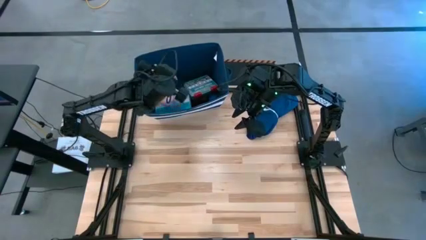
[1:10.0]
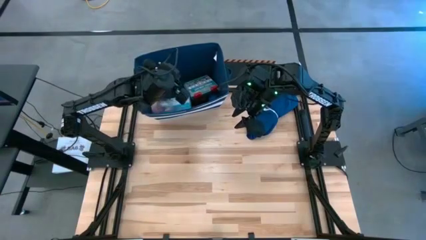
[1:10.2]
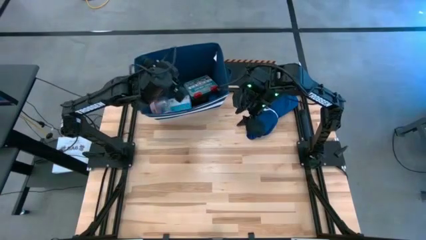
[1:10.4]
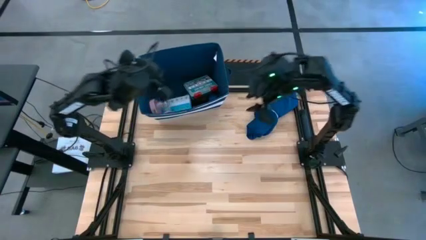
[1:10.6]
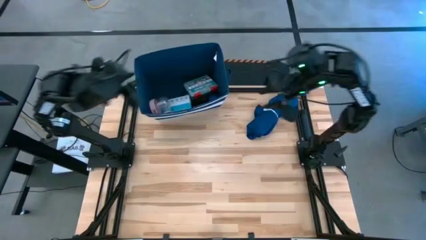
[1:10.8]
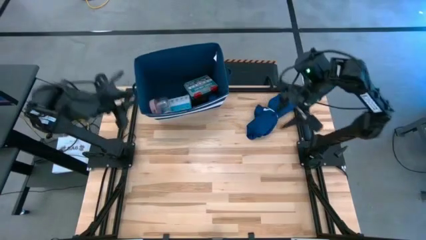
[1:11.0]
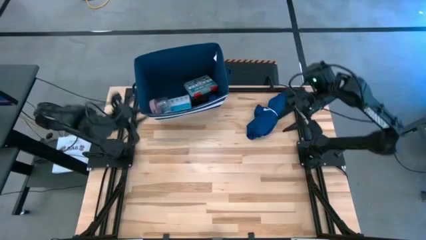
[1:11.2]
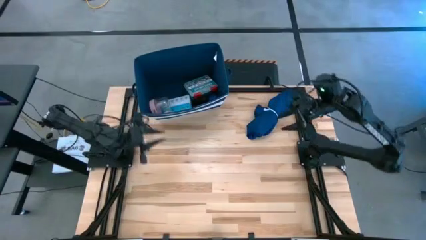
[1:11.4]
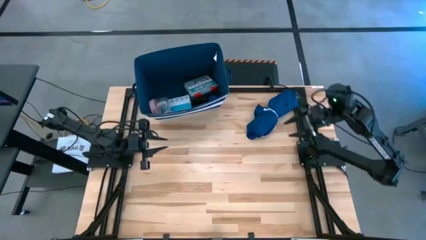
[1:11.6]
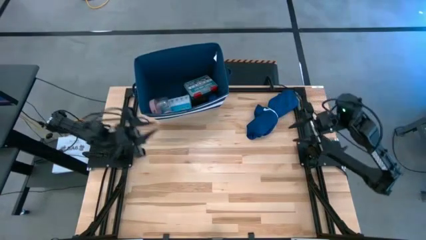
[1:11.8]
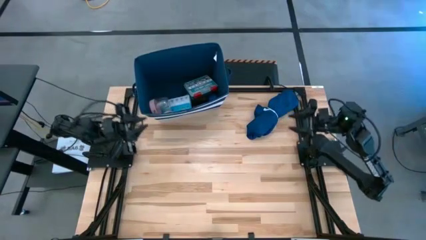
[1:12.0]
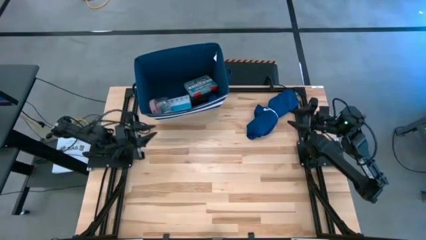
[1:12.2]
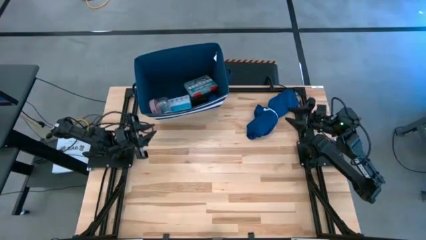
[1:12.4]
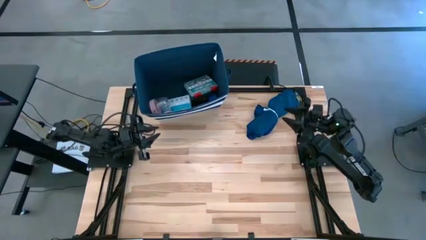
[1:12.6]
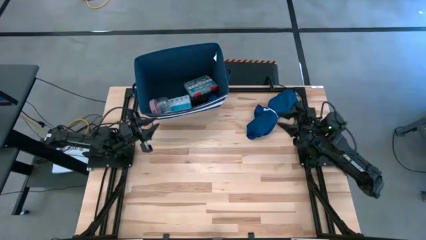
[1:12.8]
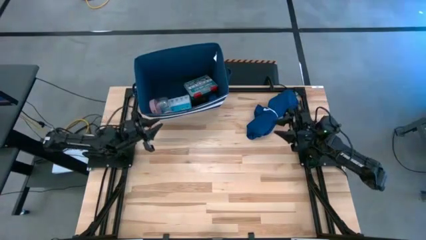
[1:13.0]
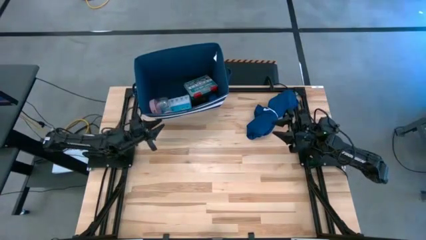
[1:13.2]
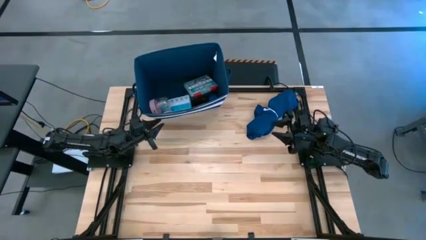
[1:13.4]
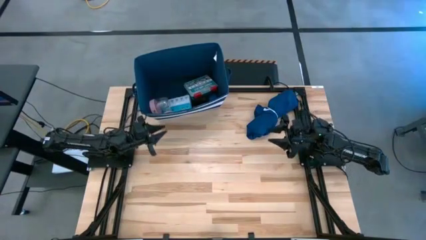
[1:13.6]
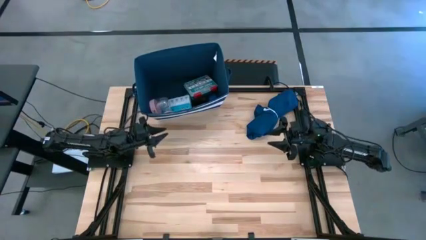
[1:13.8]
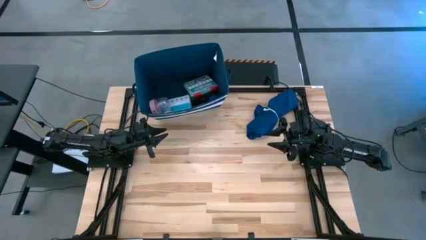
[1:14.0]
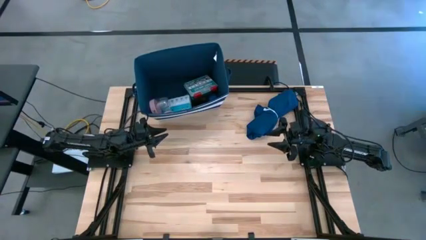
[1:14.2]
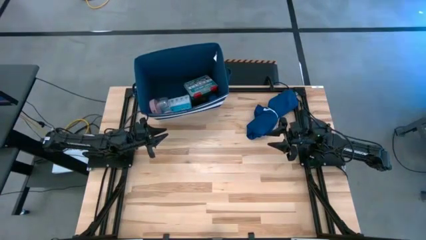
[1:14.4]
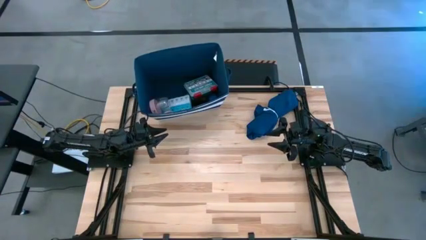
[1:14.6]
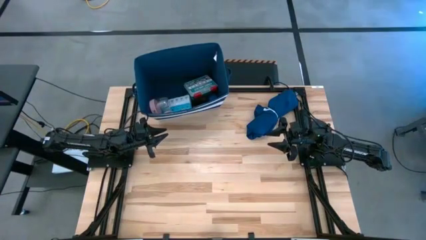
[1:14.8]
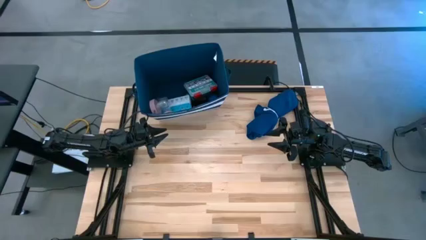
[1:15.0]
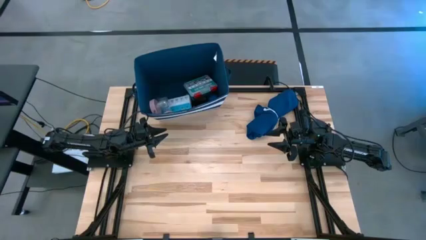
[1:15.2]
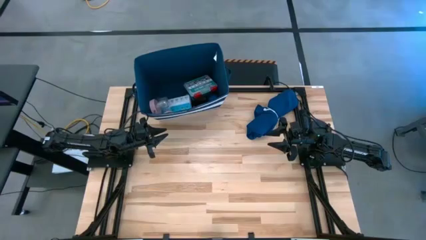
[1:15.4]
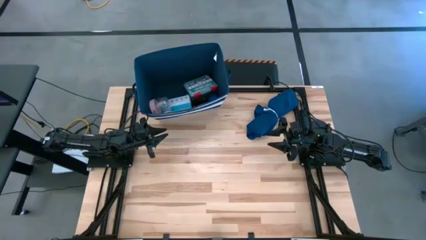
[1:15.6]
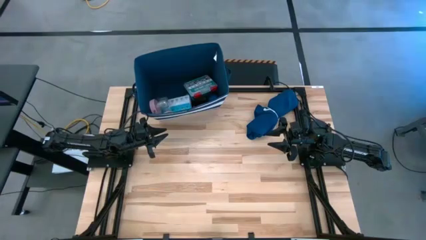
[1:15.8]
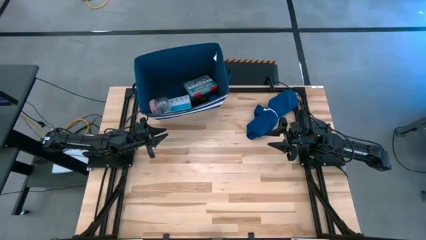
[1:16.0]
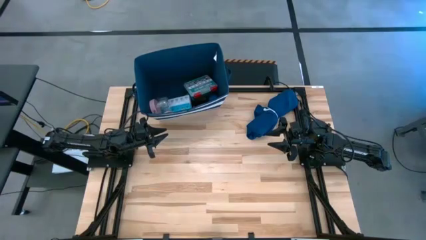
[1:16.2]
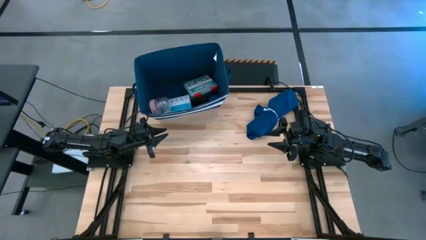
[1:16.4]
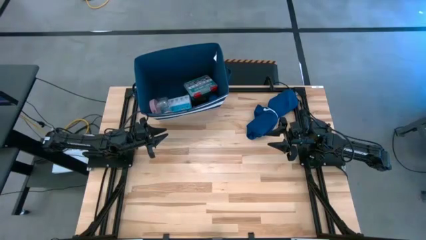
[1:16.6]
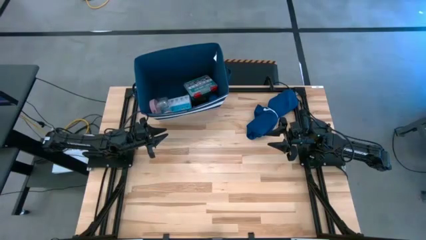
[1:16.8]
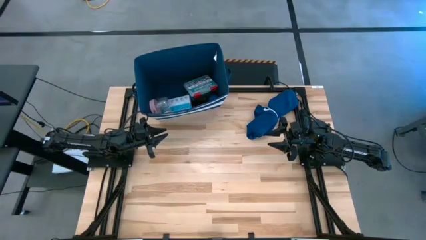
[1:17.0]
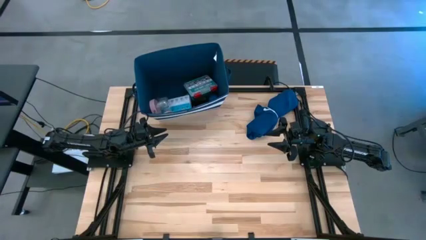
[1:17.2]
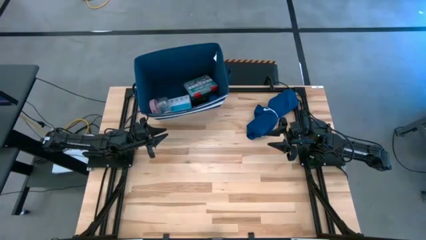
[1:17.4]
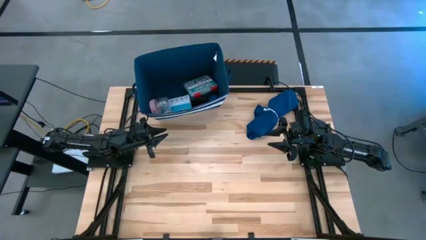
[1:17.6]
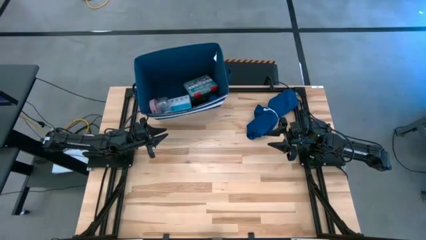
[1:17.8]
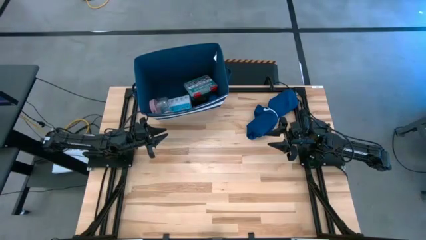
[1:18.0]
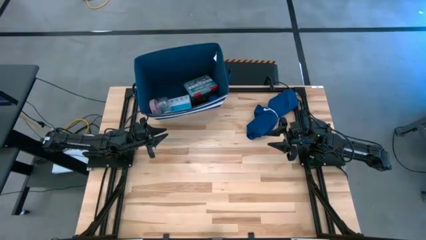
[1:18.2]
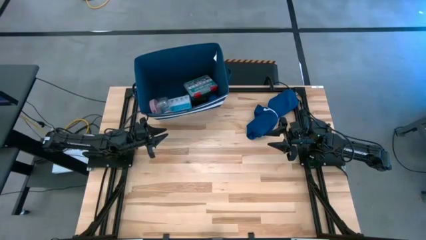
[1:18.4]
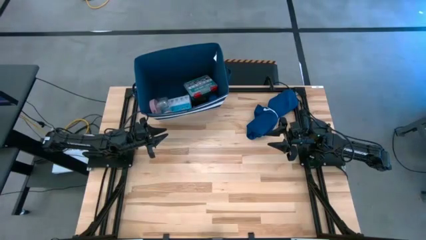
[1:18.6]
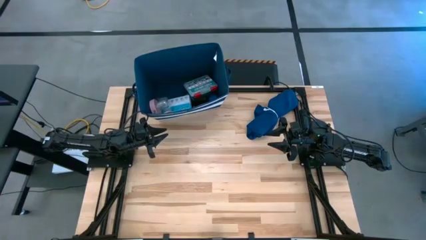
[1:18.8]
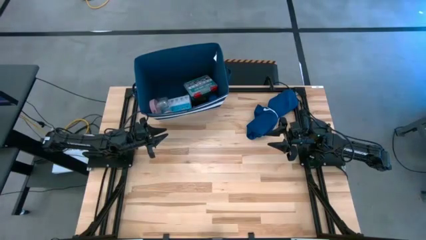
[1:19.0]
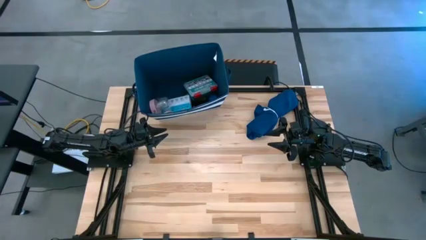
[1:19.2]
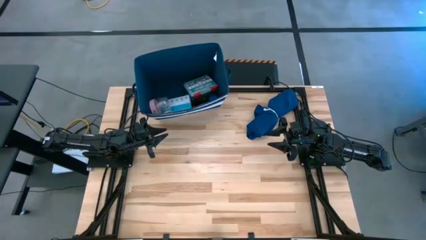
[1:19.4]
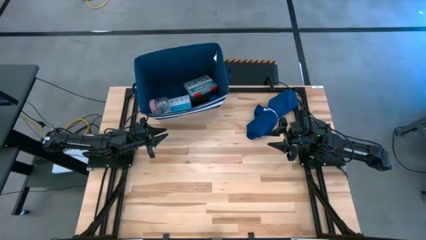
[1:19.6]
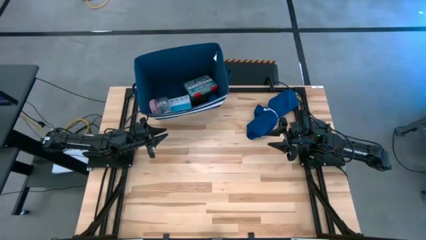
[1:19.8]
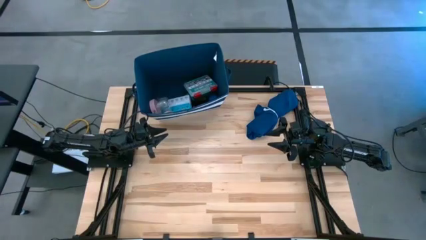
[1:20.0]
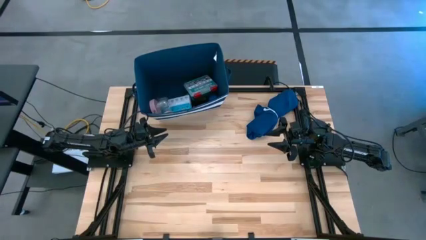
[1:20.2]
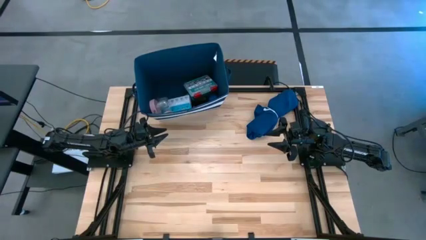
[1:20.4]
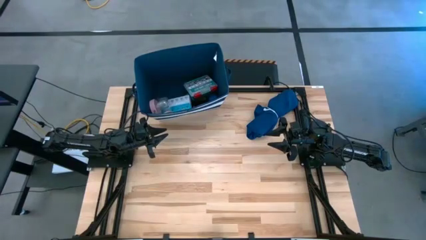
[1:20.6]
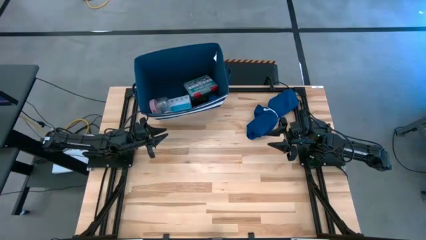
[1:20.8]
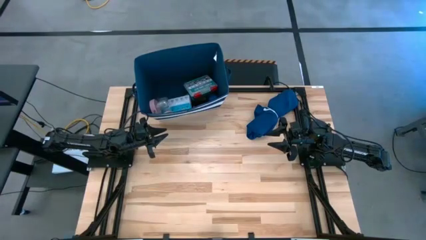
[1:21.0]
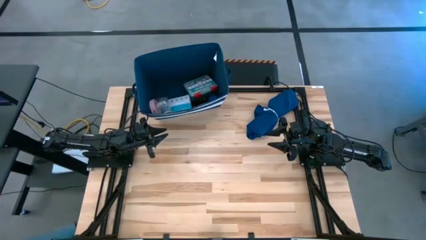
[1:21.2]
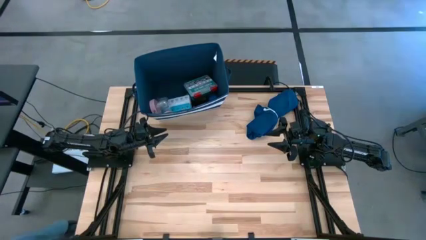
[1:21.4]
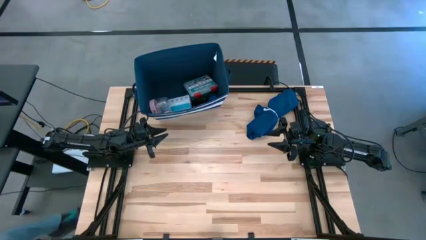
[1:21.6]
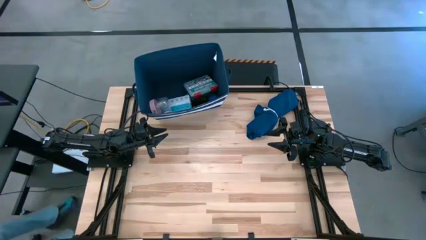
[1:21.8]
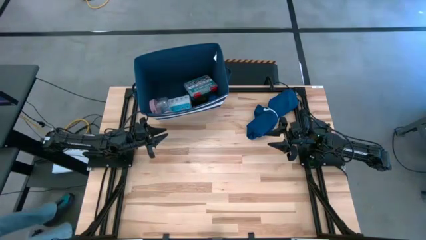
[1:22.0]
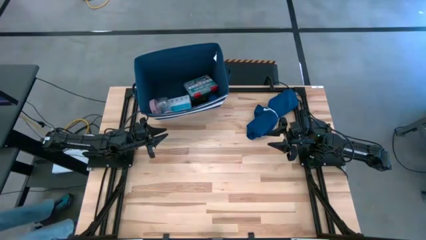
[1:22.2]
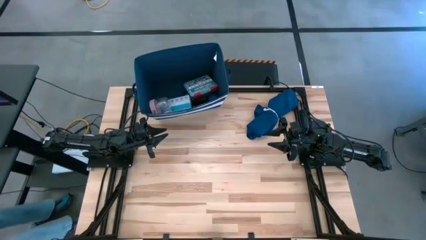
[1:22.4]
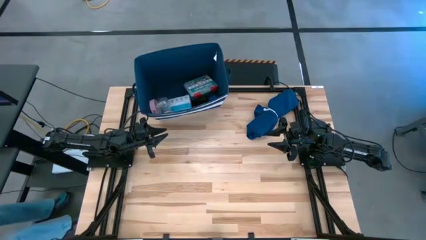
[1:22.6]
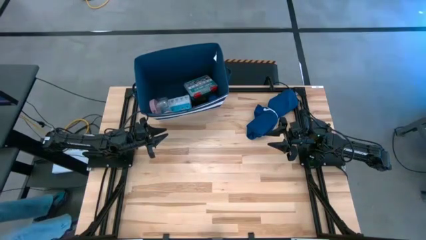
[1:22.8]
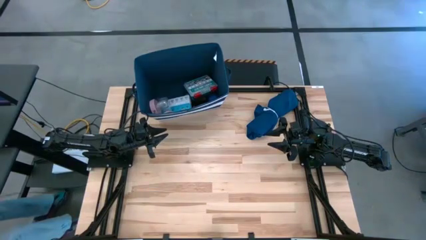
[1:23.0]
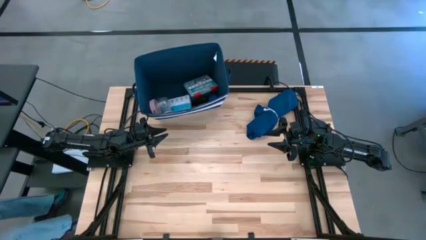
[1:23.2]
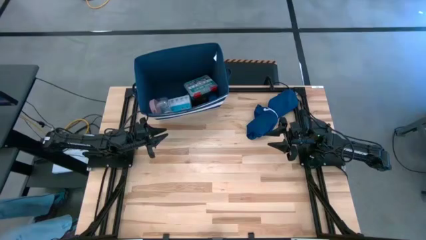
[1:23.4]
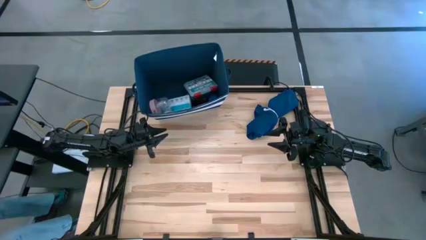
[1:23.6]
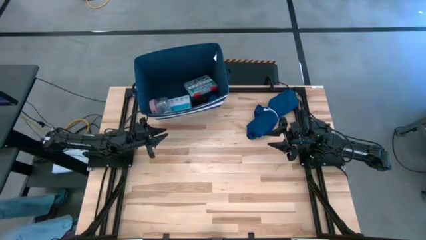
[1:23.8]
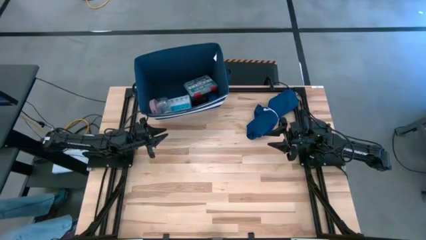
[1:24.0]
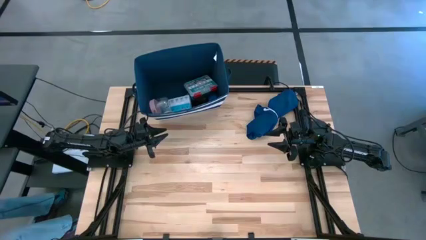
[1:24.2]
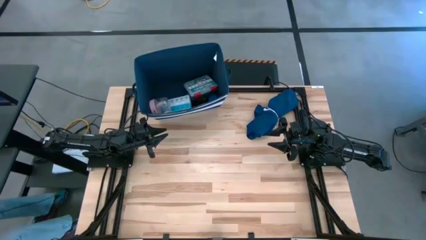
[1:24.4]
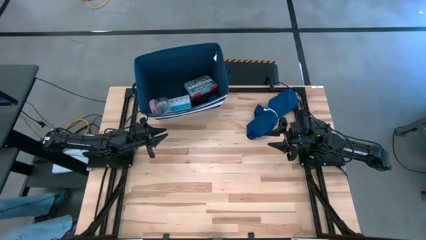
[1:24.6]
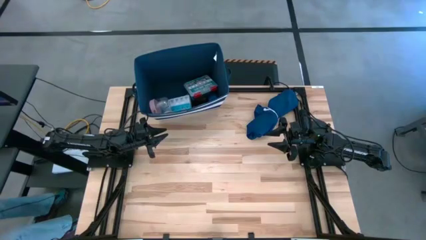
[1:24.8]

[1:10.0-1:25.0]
Task: Pick & place medical supplies in basket/bin
Return to Home Position
